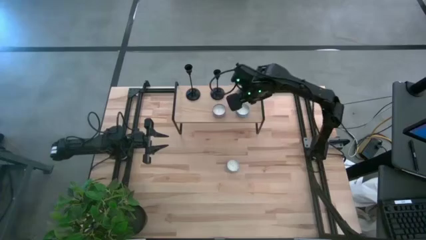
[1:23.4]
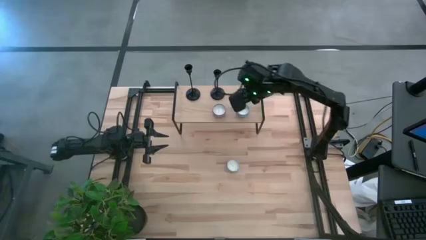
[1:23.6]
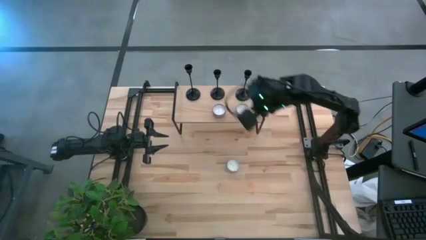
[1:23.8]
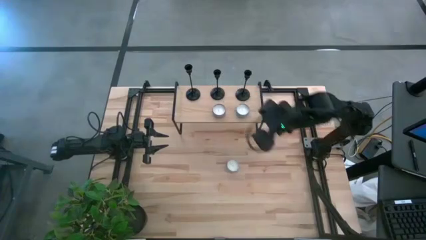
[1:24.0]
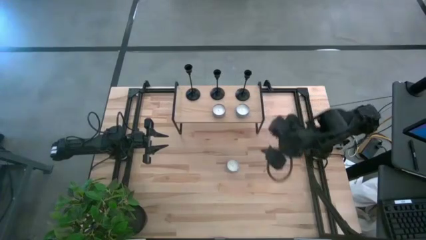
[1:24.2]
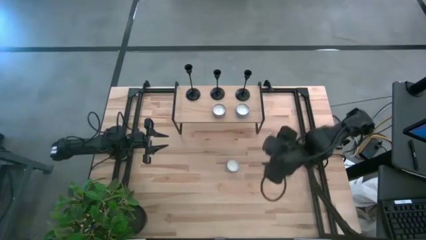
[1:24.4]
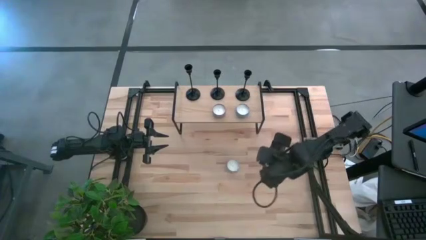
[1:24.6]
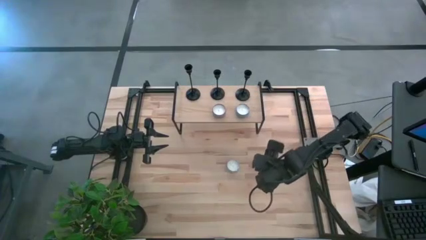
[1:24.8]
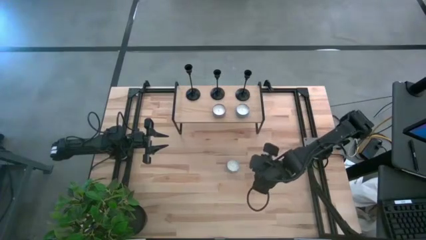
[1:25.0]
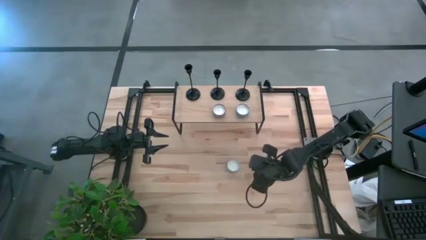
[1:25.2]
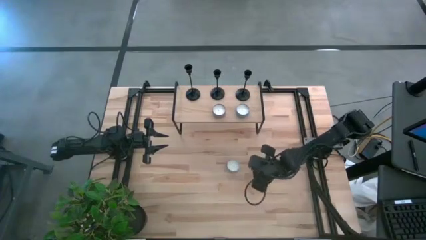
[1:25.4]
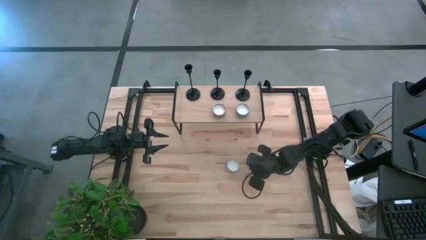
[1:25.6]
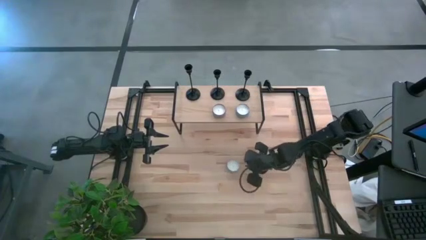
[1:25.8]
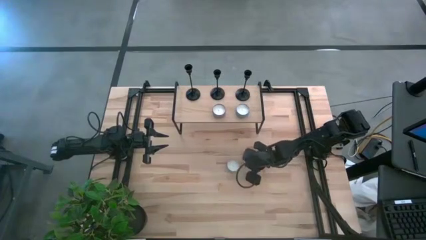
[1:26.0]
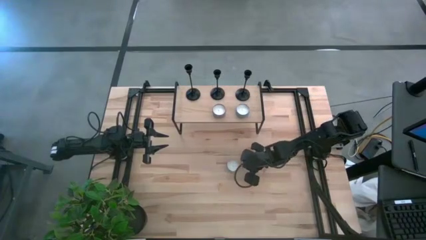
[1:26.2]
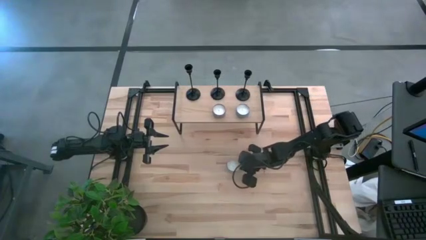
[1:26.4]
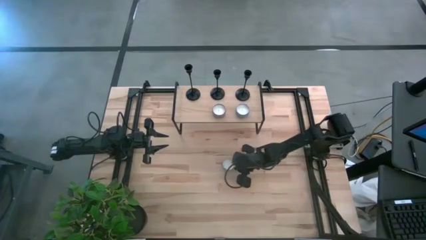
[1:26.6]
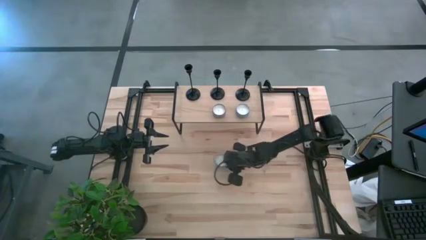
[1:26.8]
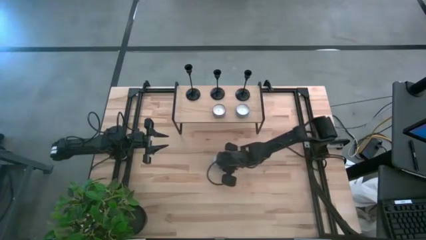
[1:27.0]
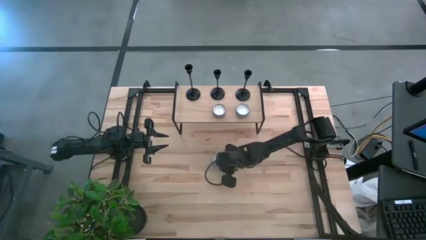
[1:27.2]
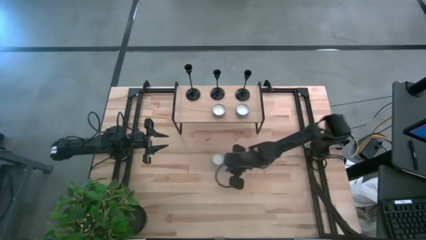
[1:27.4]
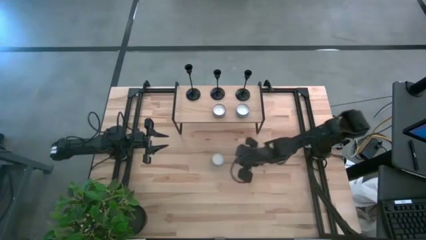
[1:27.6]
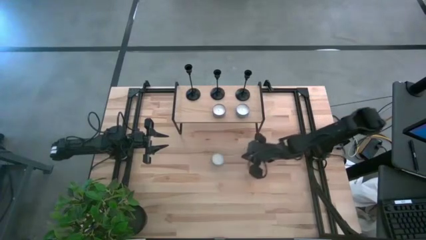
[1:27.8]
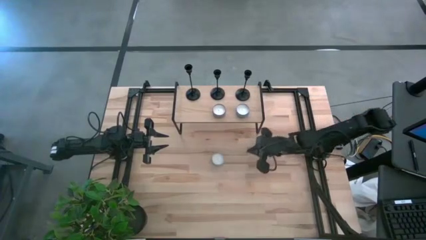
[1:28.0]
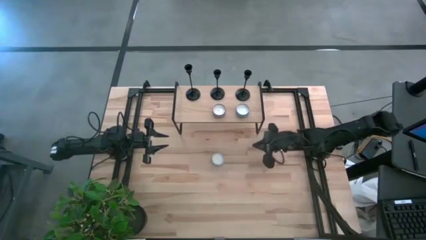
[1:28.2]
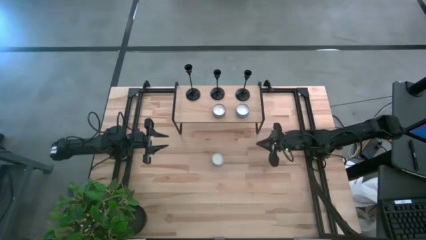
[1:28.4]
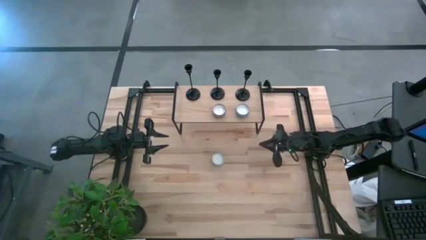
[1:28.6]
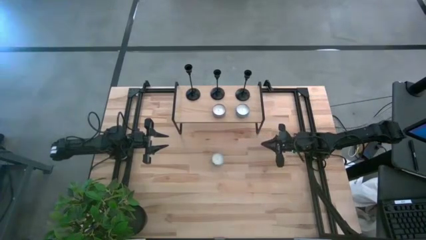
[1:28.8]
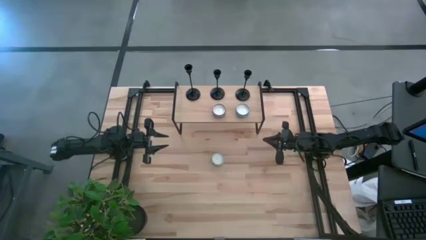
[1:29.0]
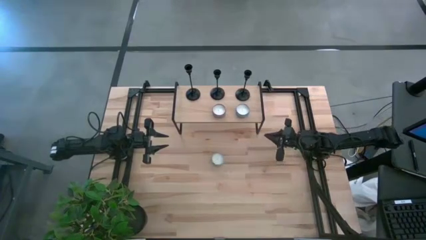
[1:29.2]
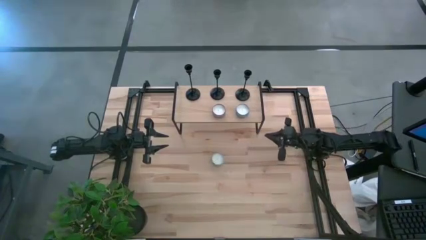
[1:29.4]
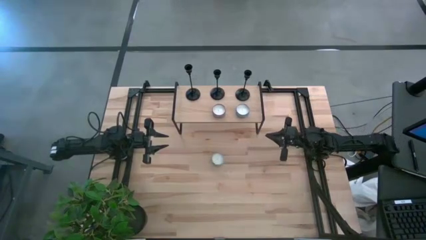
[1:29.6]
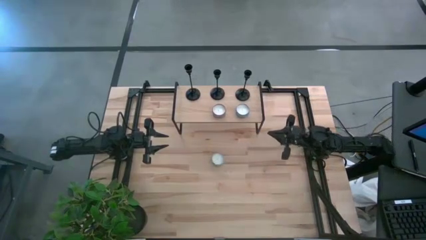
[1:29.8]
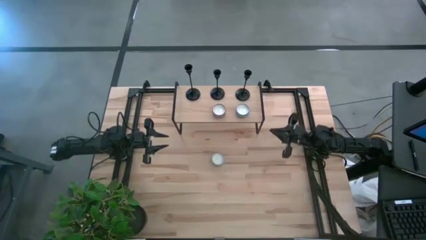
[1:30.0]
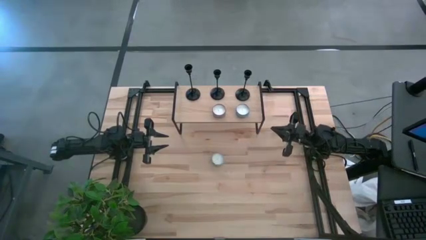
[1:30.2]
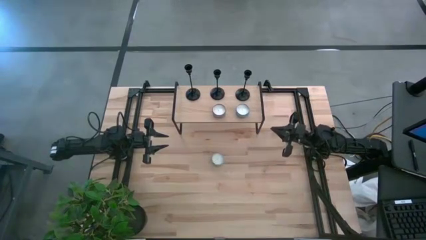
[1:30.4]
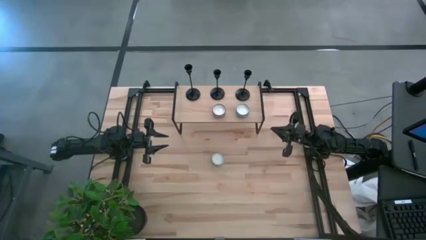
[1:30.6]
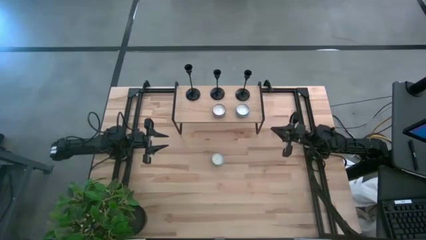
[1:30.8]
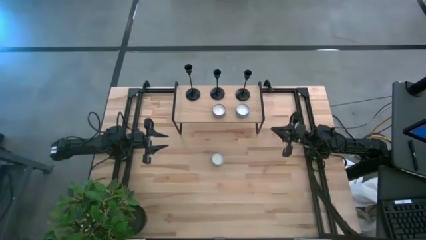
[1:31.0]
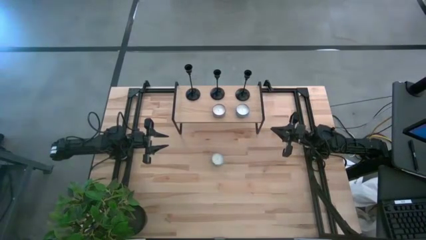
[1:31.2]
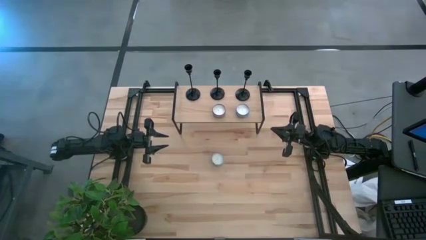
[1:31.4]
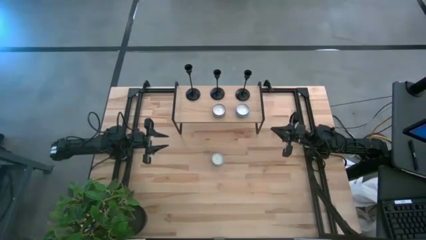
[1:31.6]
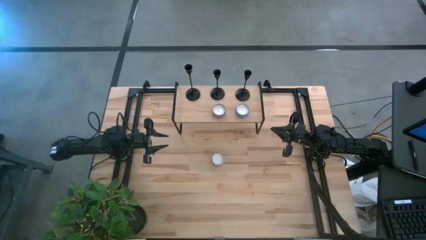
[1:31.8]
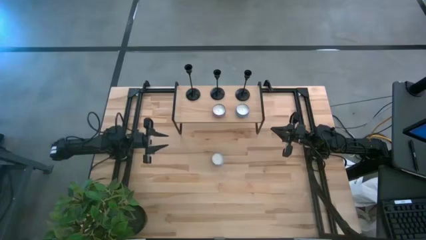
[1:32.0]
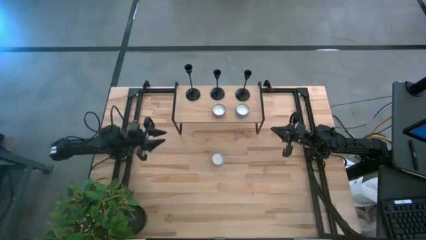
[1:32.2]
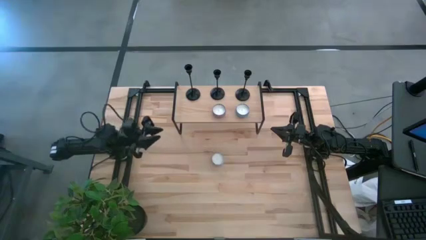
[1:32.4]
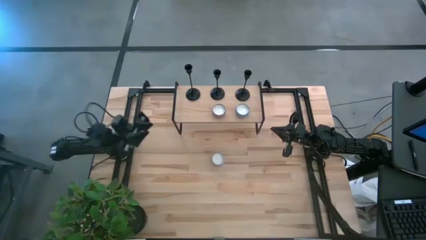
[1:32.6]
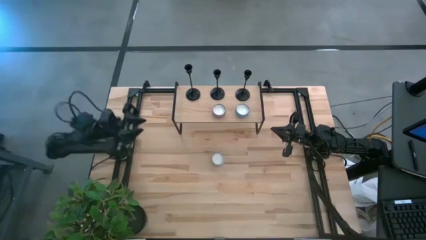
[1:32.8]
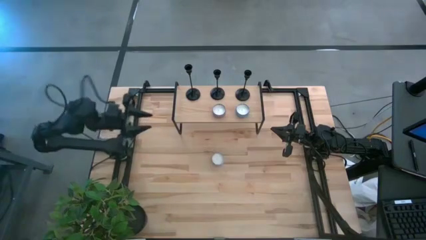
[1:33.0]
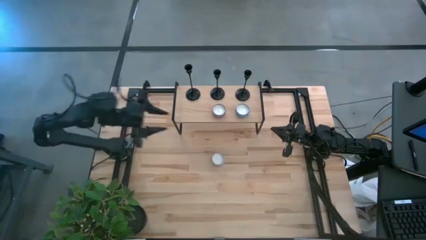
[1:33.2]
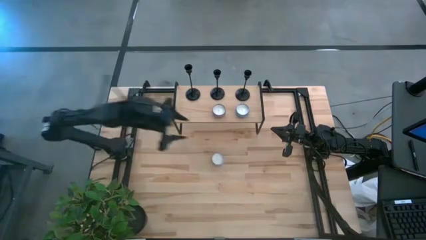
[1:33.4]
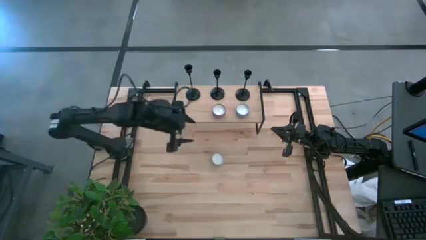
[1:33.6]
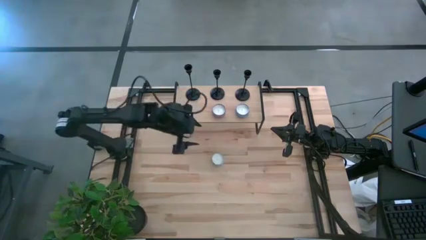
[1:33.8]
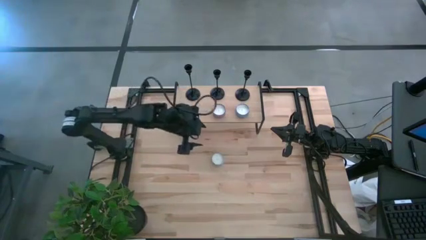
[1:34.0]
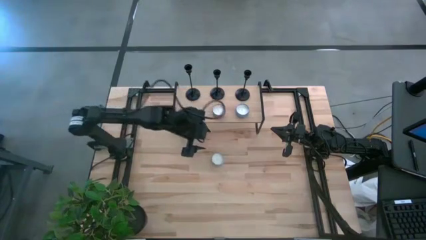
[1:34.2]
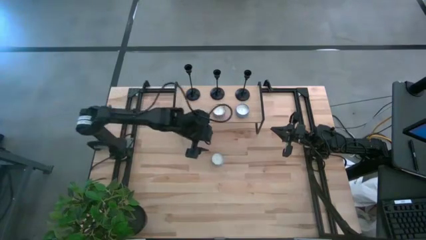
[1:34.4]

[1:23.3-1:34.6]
Task: Pick & Place candle stick holders
Align the red scented candle with the other scented candle on the shelf
